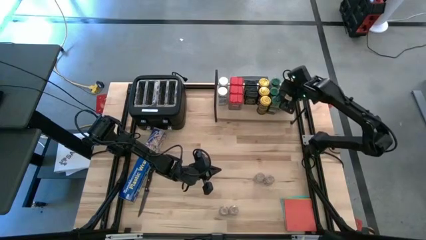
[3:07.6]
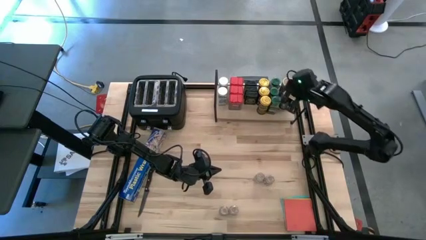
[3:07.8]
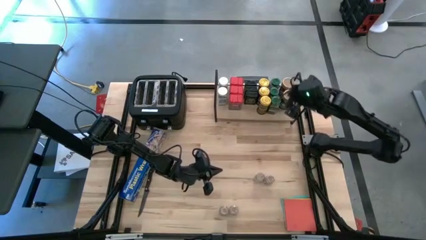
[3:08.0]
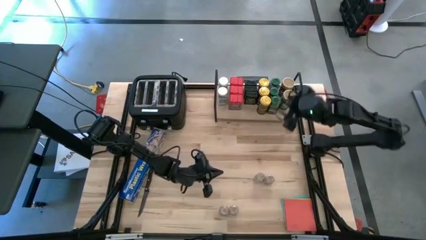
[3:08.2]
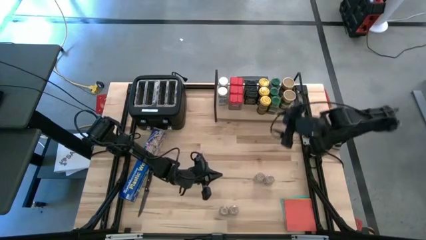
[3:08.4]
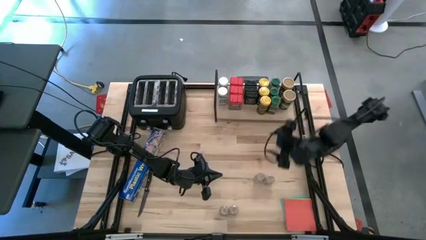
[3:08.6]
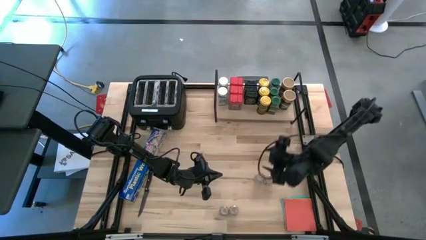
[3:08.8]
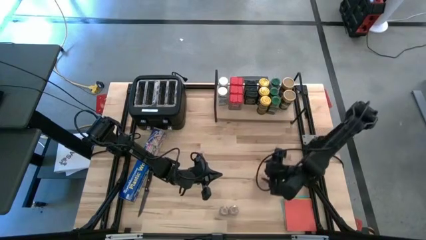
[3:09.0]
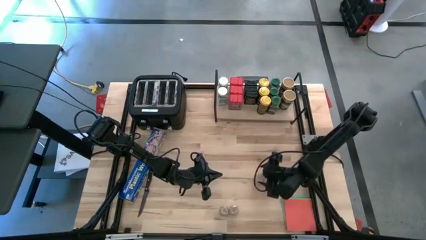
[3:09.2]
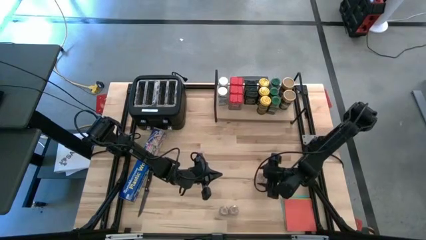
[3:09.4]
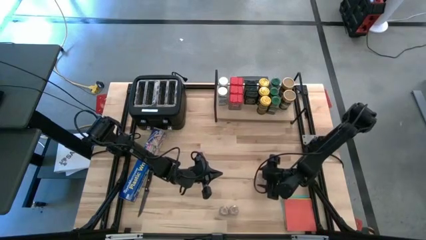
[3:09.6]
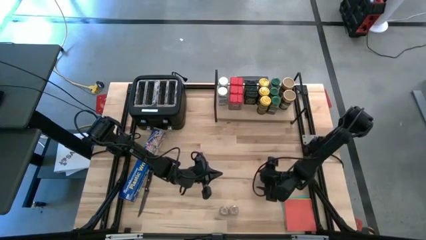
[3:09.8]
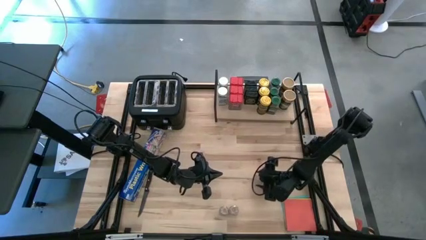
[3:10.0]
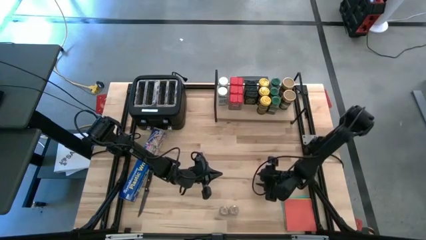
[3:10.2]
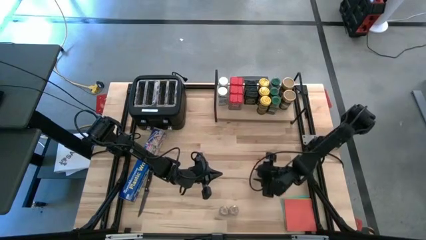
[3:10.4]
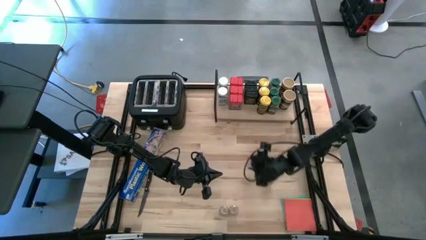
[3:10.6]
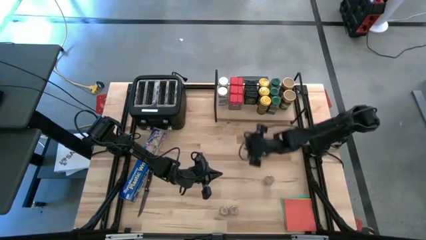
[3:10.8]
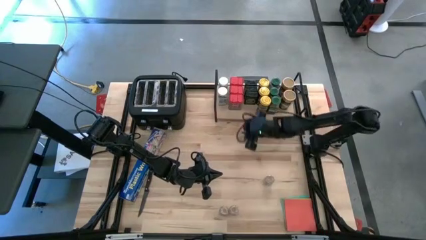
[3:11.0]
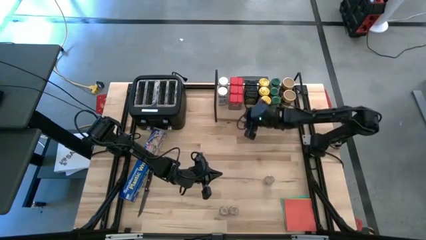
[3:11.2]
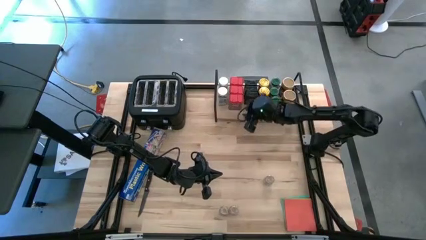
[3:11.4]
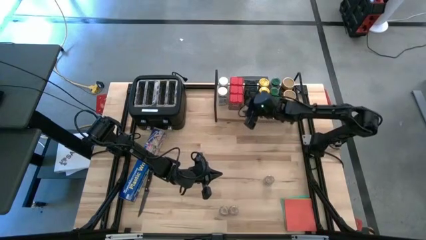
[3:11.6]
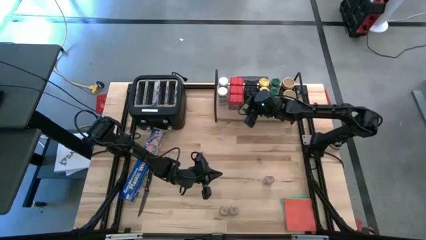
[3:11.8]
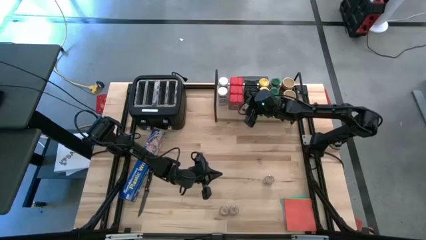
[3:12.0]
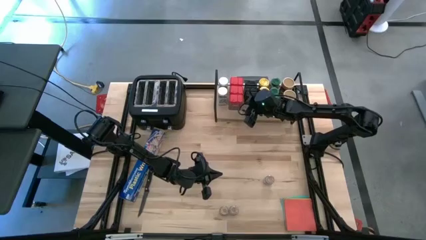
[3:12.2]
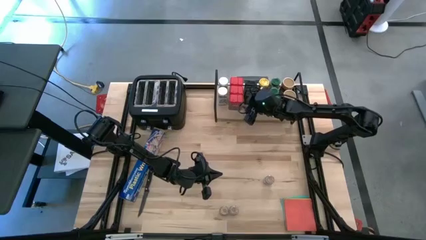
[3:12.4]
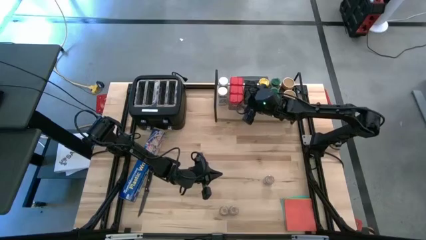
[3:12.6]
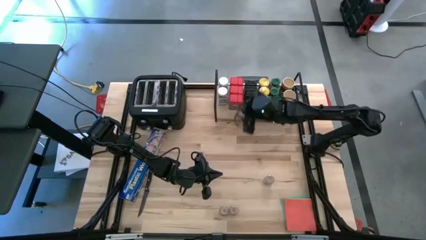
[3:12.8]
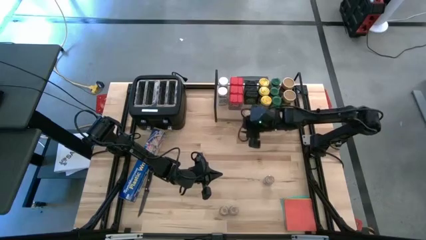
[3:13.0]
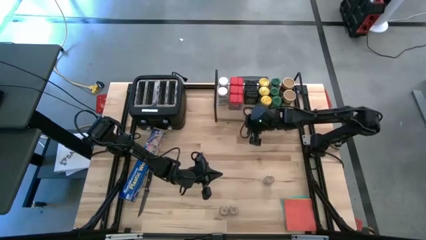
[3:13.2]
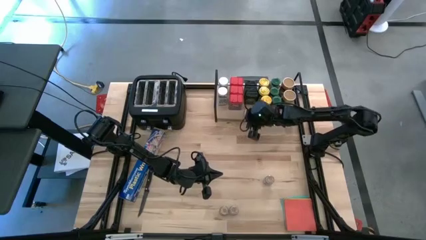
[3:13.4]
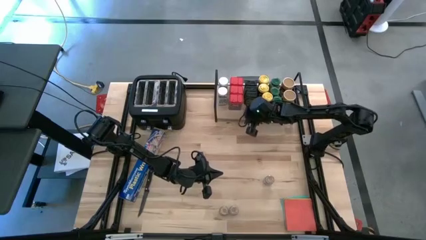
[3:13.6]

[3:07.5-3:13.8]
Task: Shelf spices
Put the top left small brown seasoning bottle on the shelf

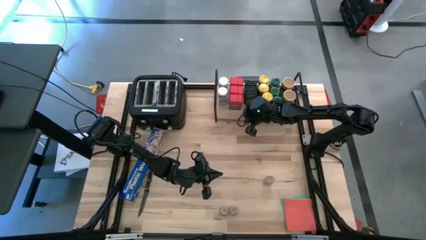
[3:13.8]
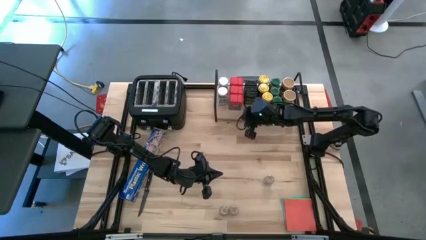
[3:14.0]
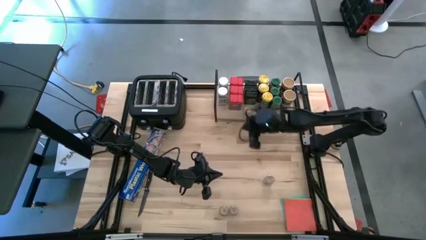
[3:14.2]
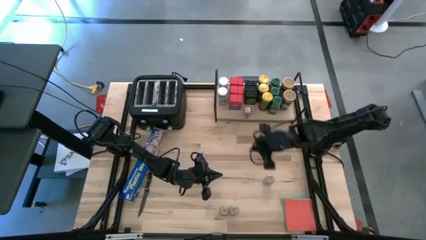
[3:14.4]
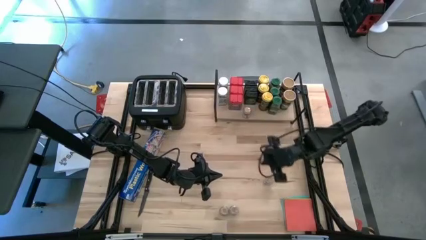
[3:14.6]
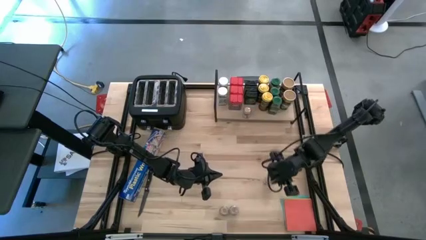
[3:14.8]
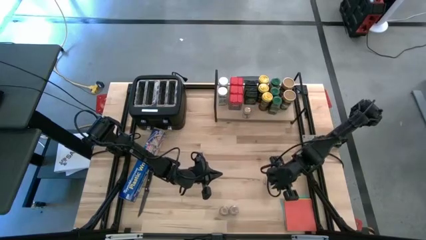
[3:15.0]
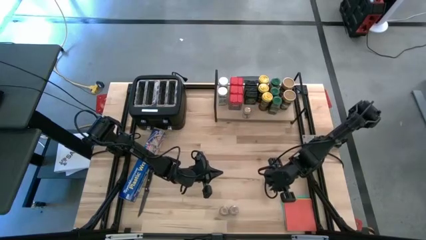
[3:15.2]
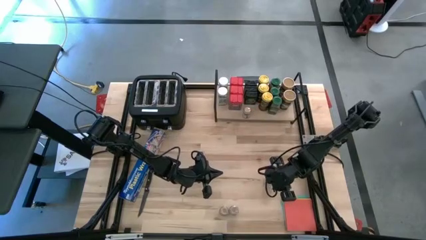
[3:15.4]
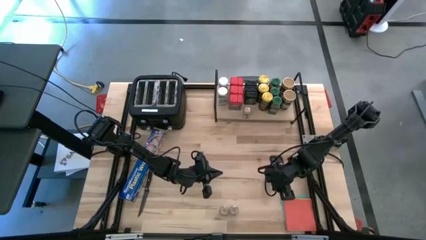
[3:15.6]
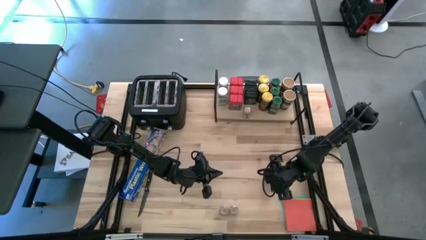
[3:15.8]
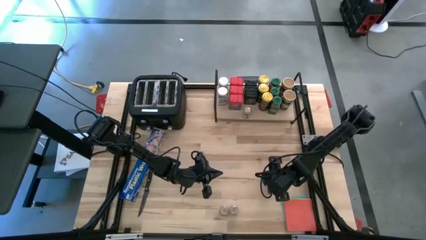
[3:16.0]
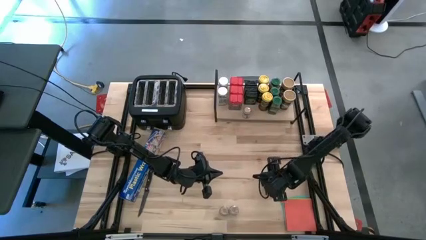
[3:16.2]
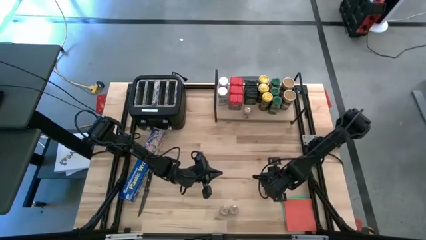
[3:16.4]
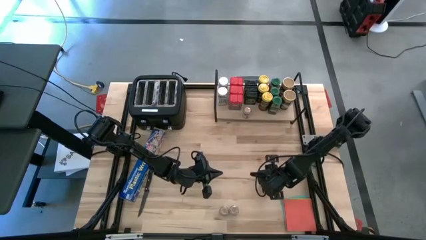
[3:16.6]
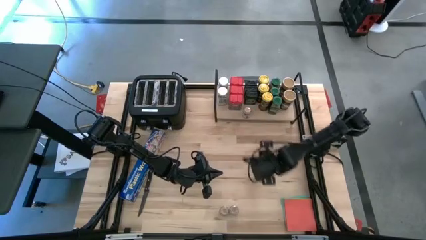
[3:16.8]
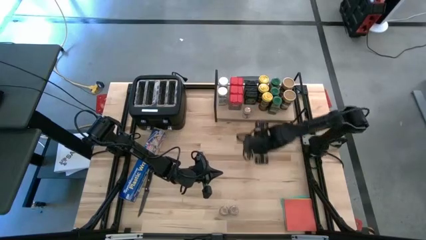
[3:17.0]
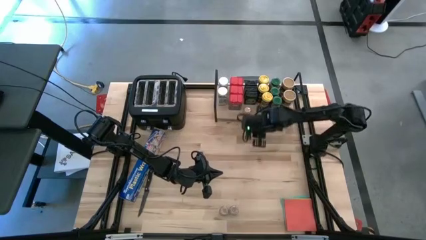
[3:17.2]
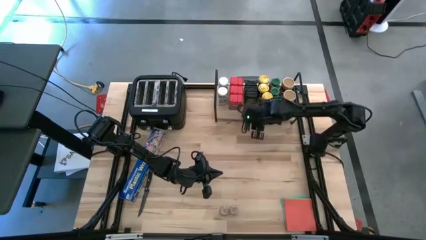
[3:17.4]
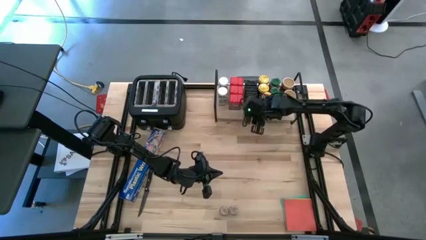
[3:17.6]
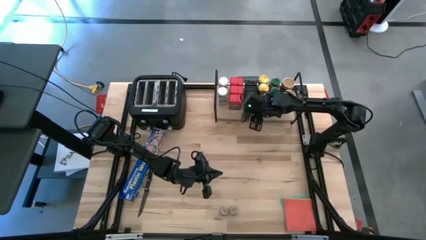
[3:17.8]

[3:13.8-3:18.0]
Put the top right small brown seasoning bottle on the shelf aligned with the other small brown seasoning bottle

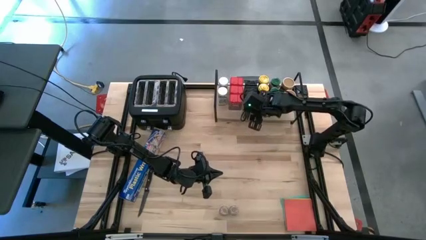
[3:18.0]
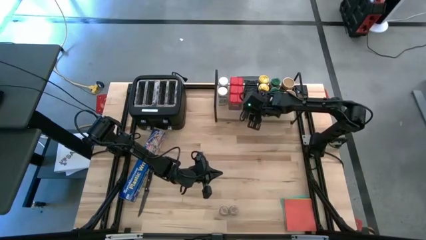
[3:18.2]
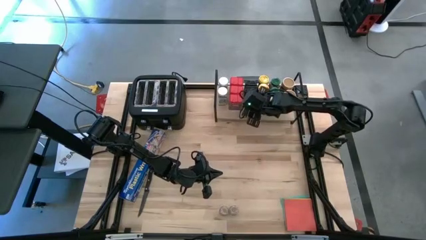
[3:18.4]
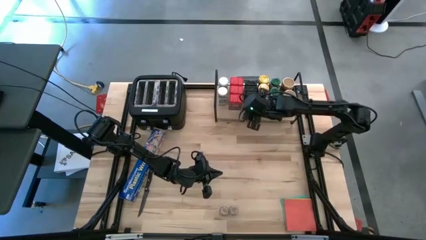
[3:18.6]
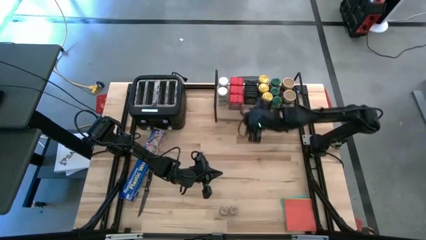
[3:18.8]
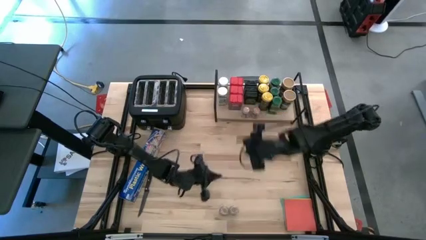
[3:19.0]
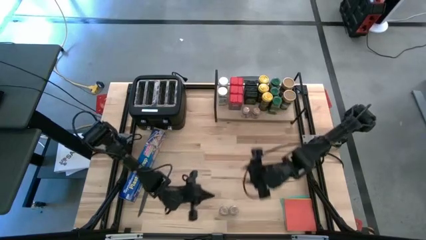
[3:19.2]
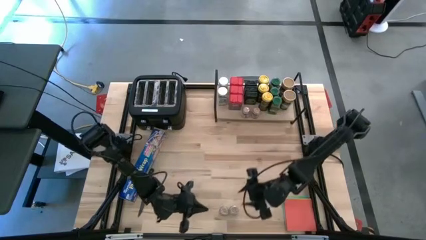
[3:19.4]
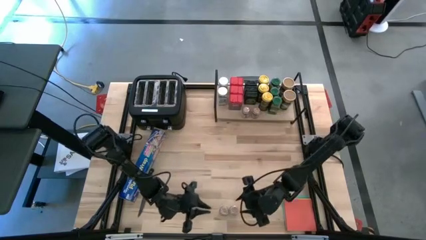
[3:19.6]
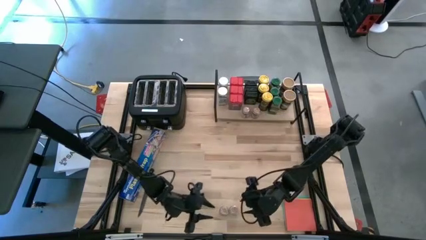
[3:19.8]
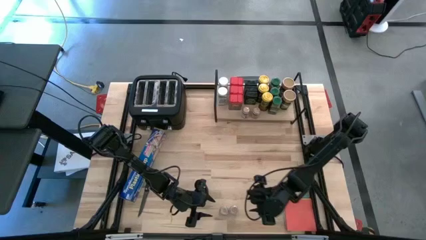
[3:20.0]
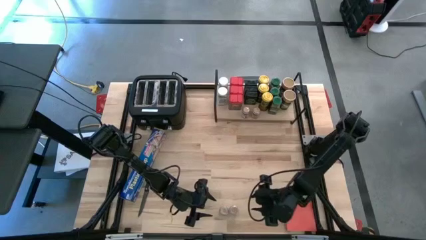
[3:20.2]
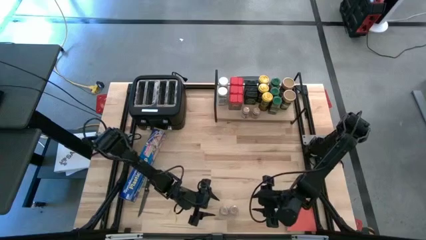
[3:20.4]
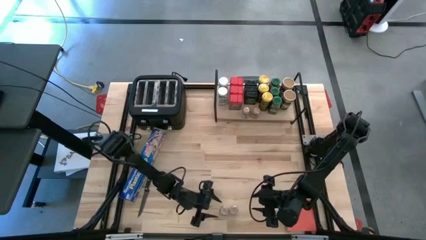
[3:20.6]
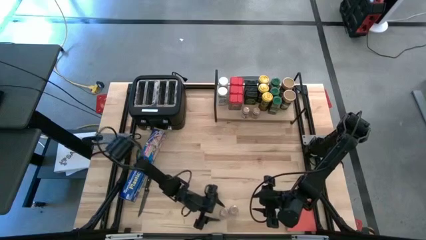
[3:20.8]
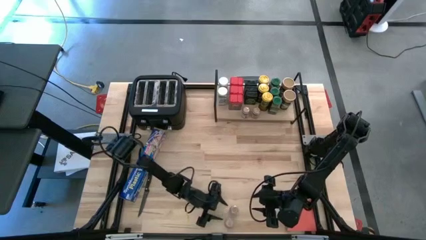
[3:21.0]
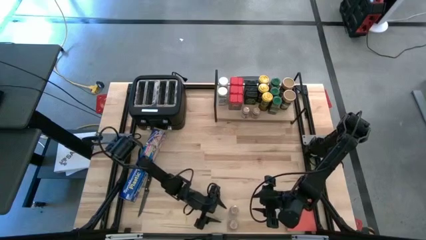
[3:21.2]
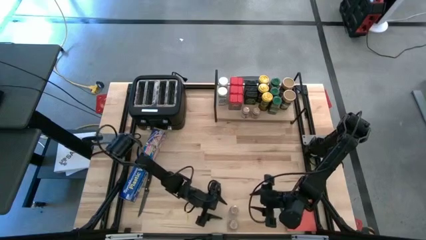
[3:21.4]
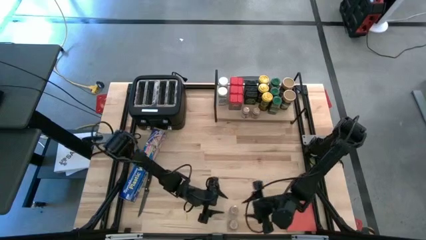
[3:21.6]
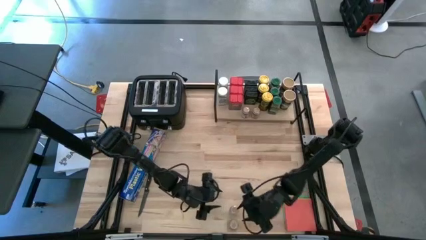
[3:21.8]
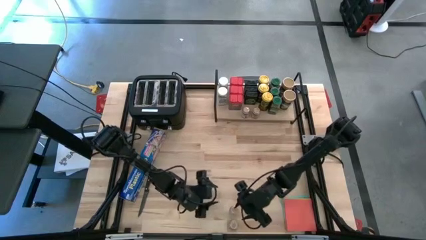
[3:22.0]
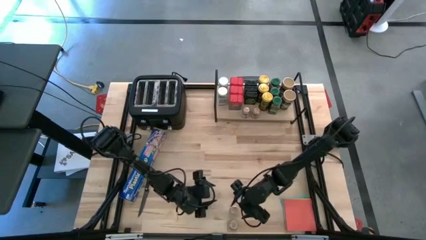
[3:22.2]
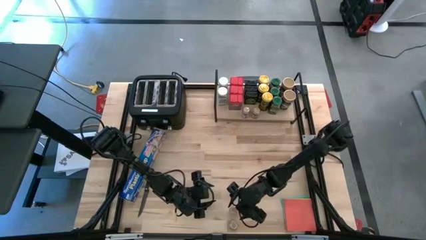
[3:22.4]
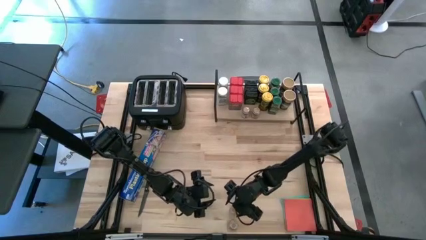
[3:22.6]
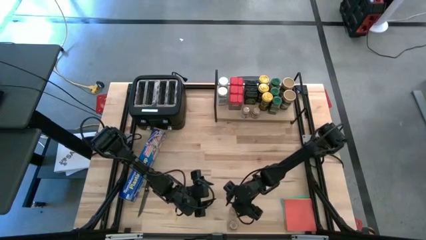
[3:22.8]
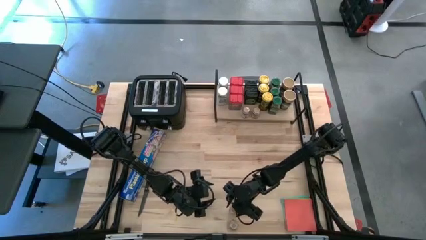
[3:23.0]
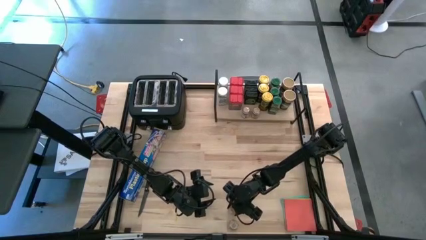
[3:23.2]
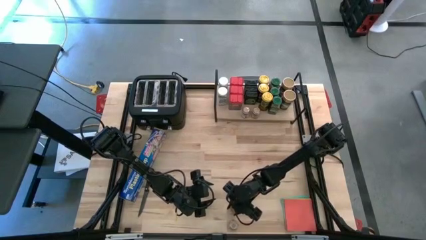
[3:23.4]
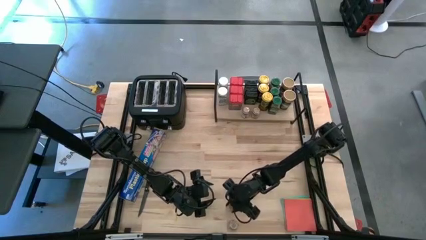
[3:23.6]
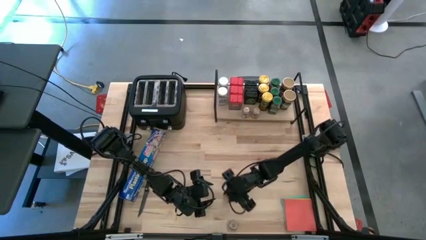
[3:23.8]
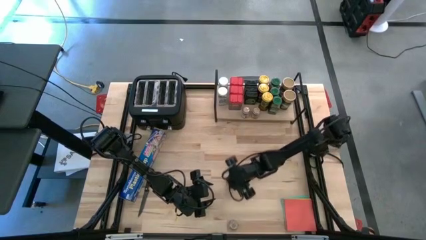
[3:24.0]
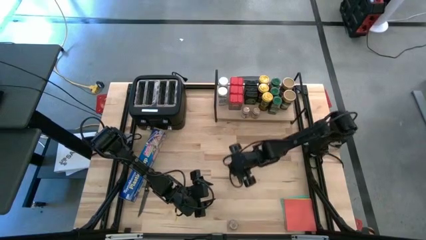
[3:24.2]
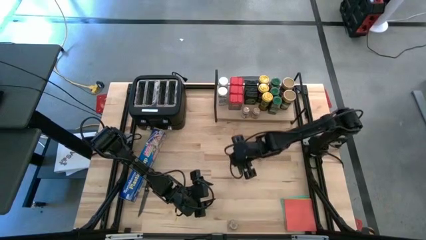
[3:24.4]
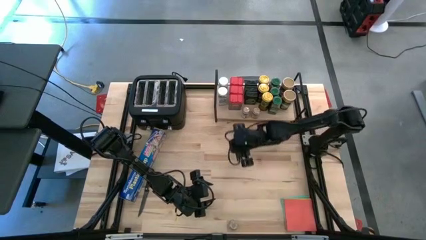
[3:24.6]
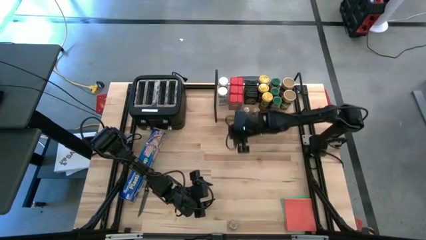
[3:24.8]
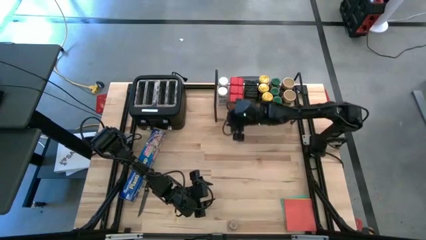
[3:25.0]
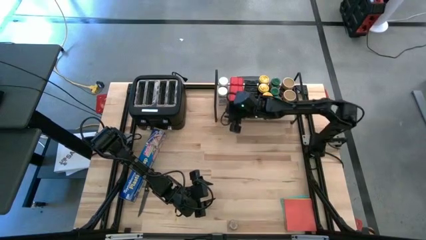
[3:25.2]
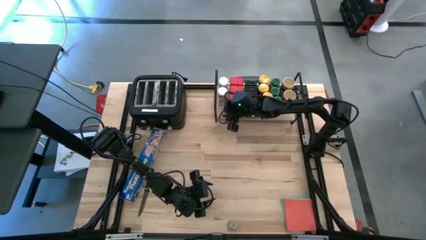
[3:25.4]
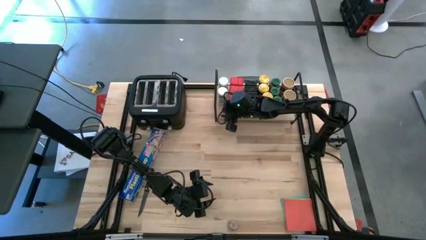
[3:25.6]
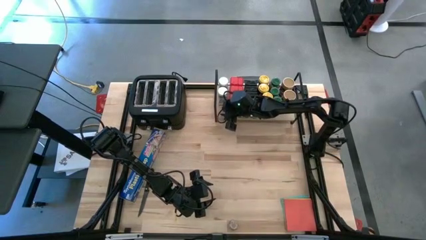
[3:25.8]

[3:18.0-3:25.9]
Put the top small brown seasoning bottle on the shelf aligned with the other small brown seasoning bottle
